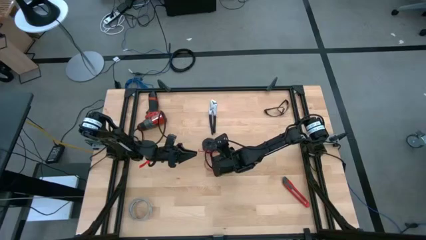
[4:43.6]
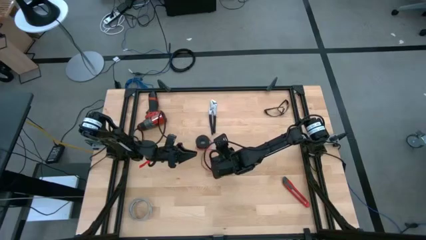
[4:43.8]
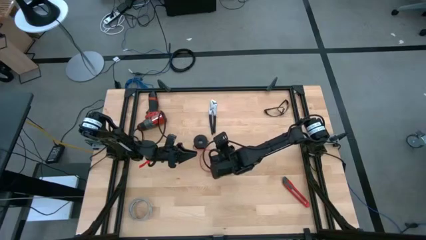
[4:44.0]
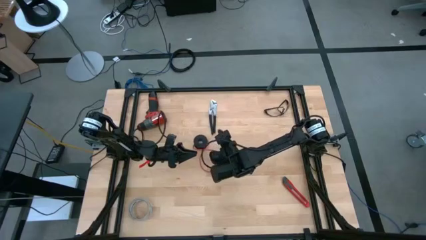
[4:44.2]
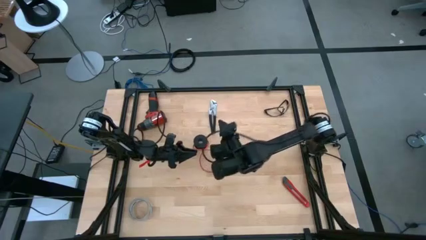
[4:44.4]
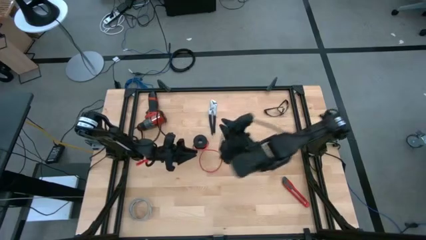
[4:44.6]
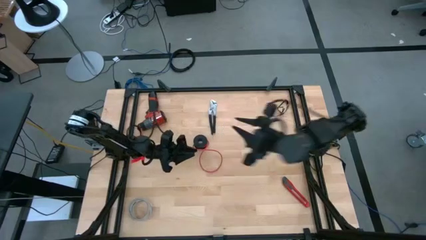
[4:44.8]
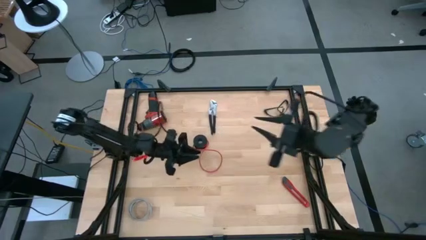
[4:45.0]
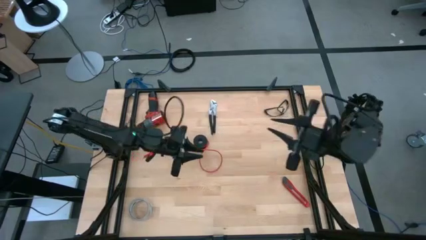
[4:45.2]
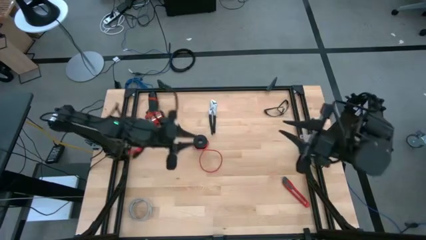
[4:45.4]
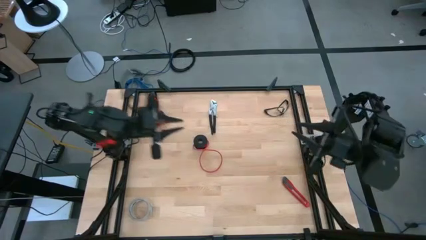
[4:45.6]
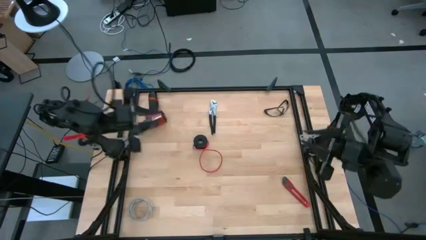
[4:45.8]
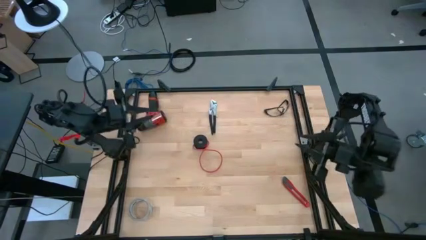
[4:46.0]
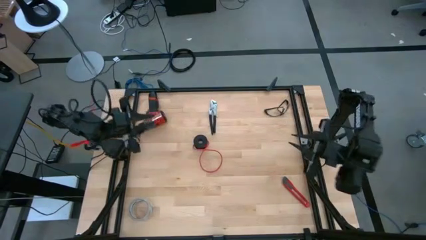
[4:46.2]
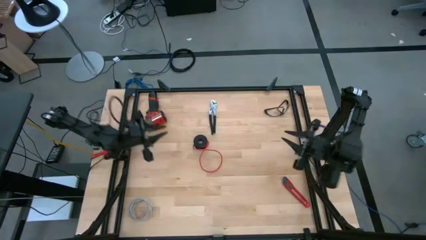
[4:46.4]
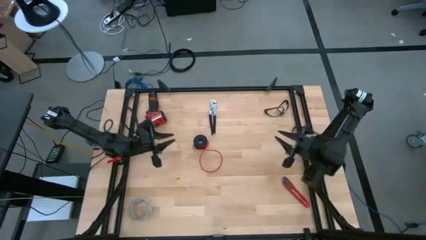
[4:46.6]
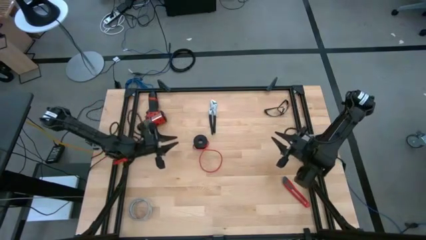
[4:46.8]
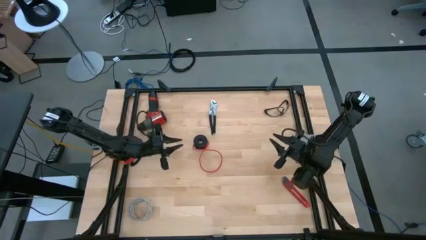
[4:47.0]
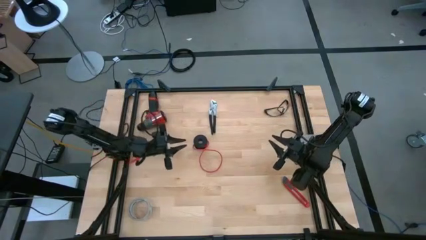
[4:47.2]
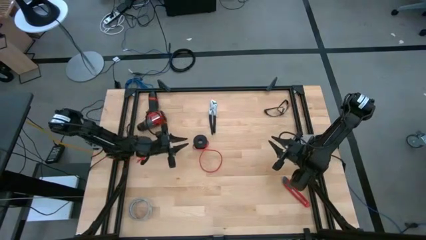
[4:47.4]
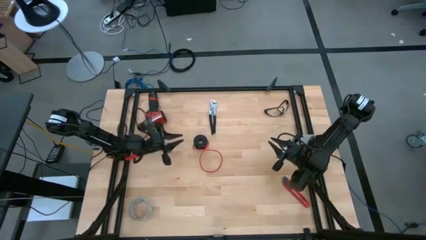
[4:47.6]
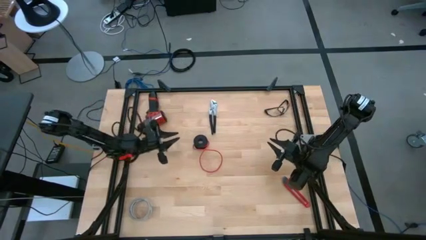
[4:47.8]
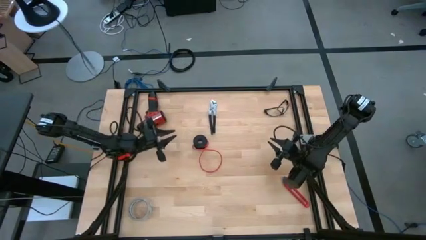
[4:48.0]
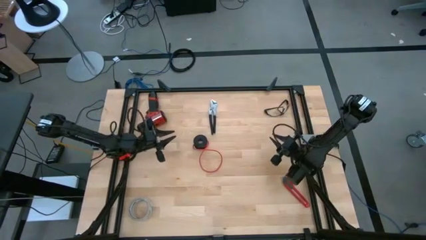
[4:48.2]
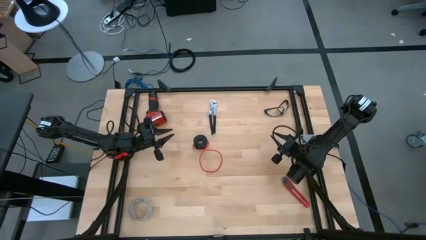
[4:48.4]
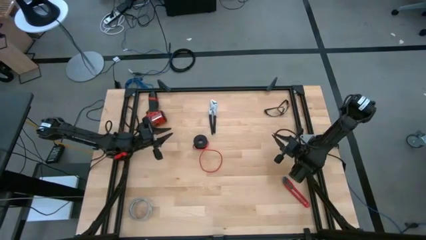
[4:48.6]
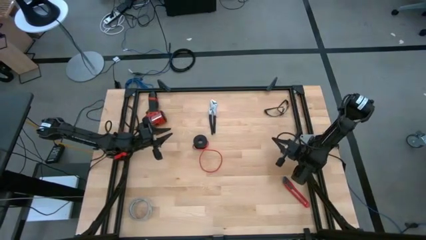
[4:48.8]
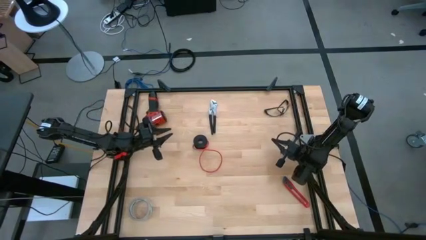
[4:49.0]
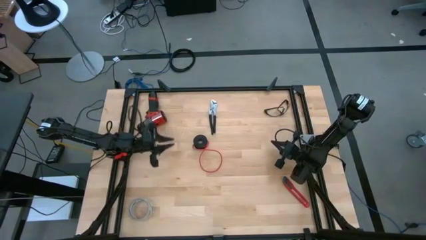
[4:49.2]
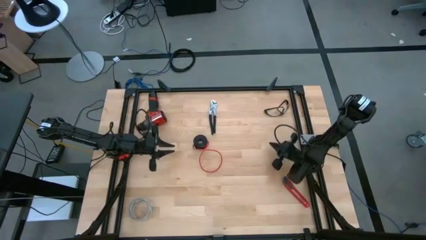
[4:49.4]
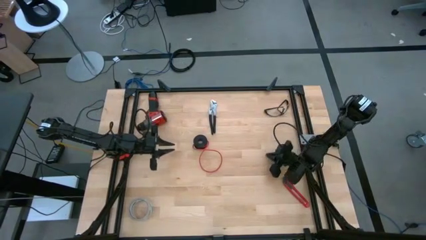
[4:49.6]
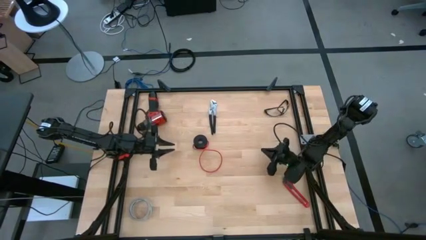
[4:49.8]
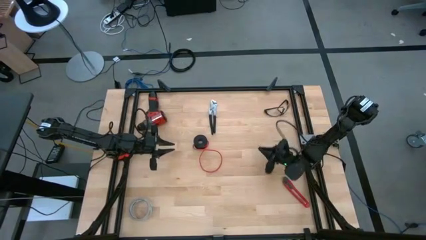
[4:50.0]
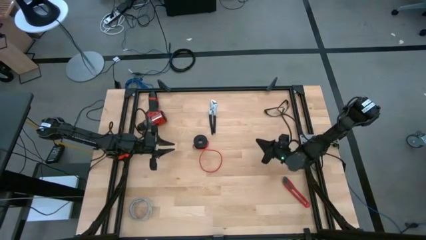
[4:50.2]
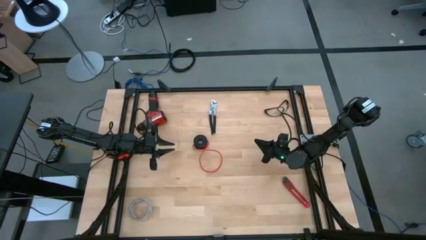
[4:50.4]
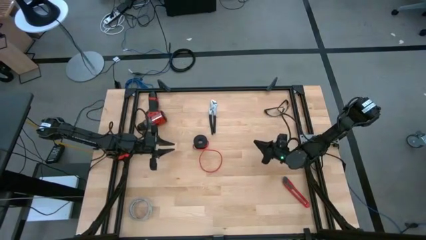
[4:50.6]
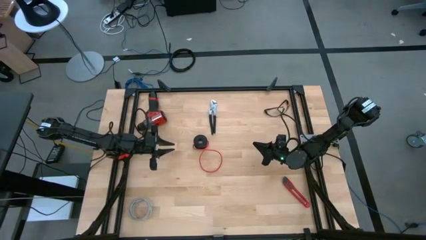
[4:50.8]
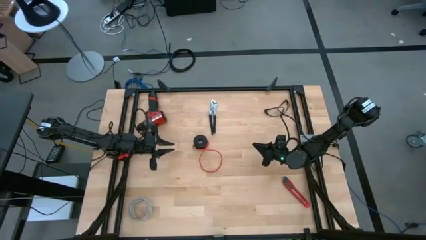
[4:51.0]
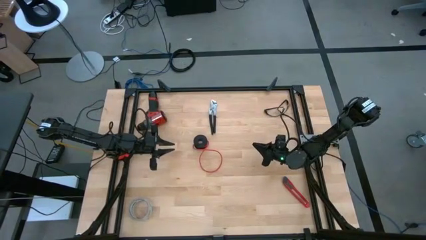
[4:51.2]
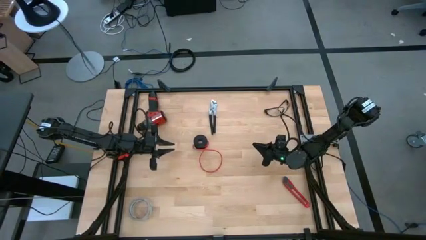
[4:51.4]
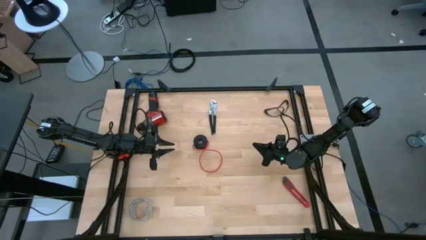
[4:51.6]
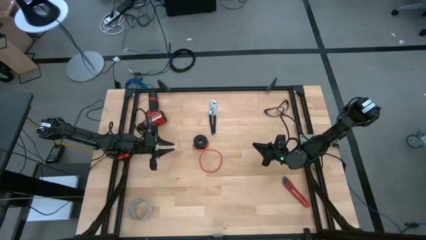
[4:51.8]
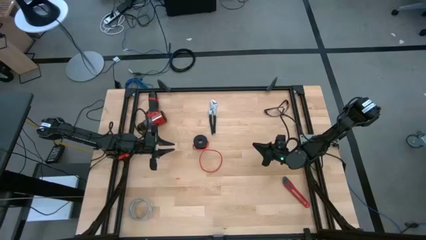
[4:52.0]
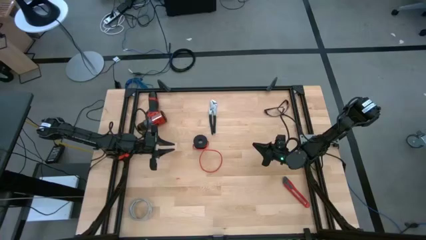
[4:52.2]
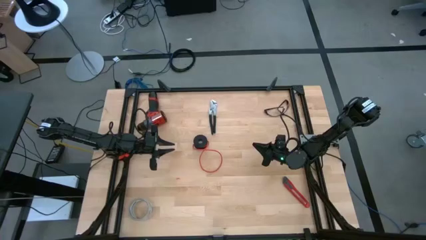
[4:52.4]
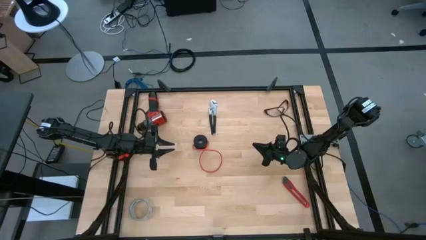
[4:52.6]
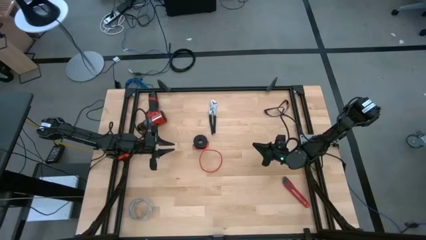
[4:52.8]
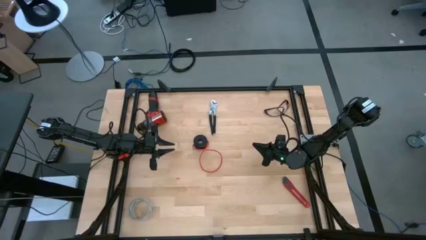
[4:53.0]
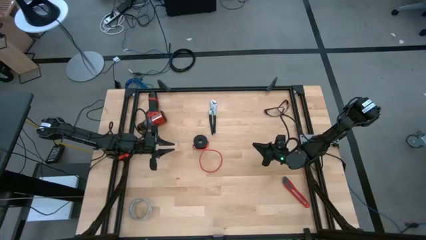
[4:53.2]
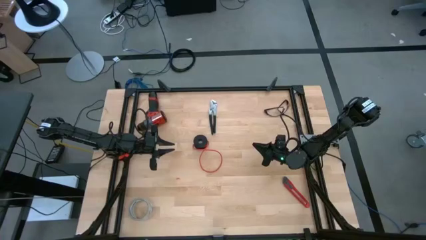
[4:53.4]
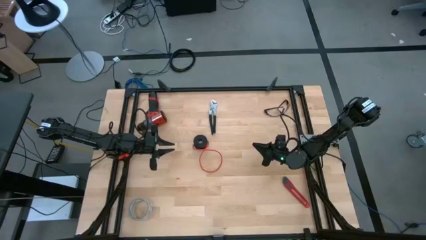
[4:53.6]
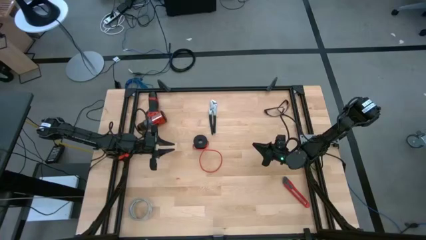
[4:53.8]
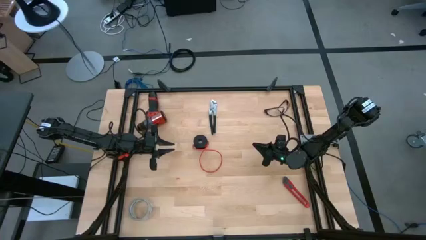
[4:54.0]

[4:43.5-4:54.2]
Task: Coil cords
Return to Home Position

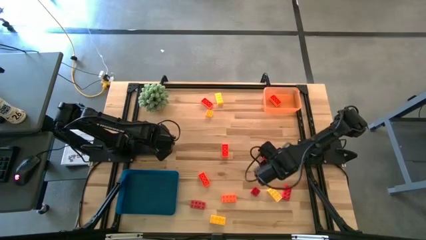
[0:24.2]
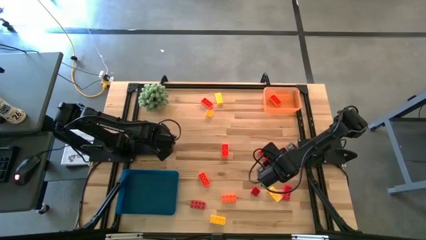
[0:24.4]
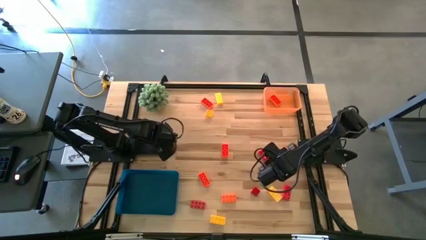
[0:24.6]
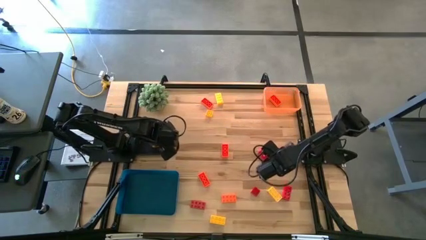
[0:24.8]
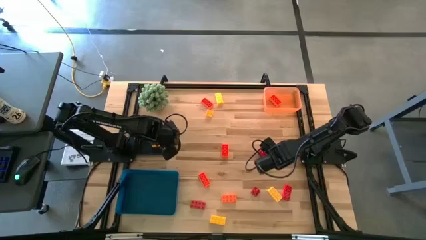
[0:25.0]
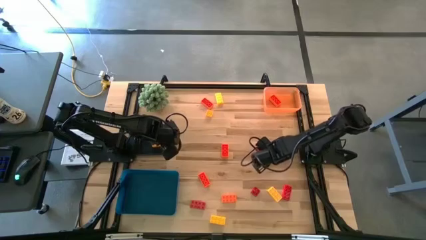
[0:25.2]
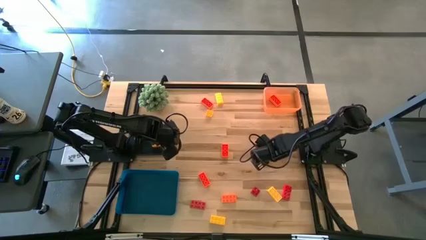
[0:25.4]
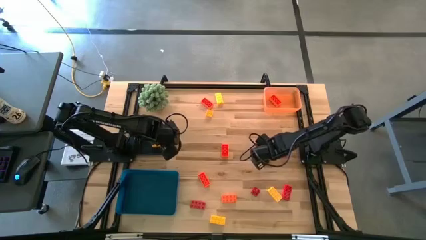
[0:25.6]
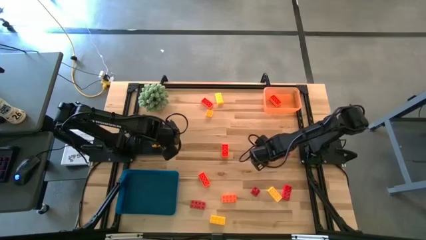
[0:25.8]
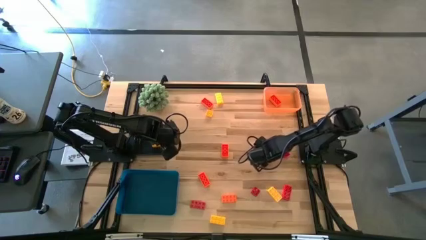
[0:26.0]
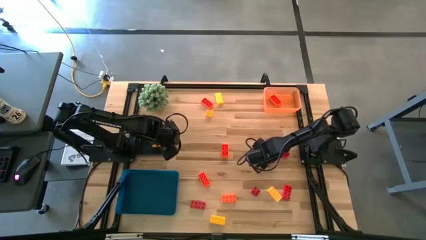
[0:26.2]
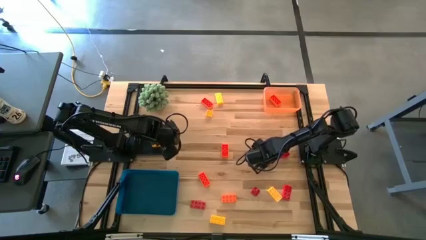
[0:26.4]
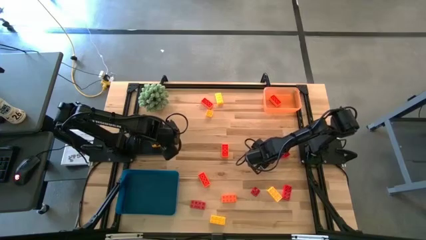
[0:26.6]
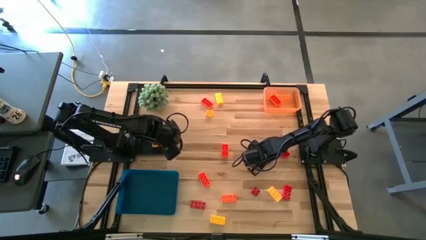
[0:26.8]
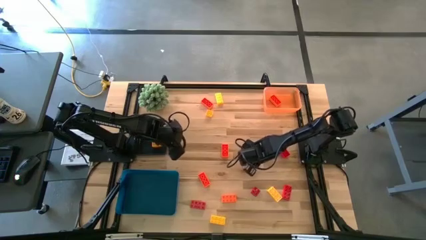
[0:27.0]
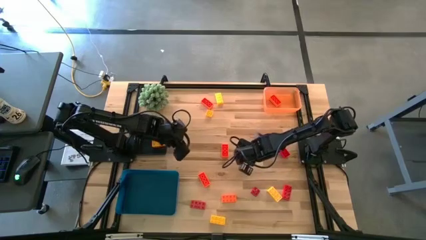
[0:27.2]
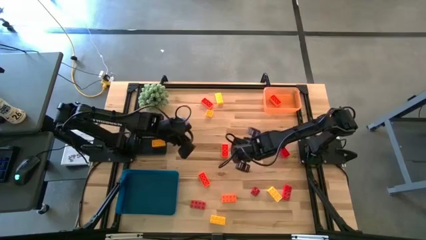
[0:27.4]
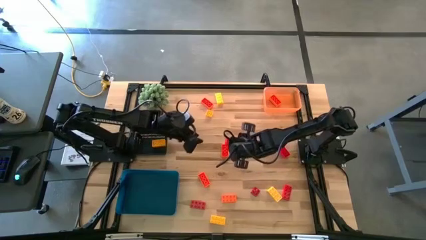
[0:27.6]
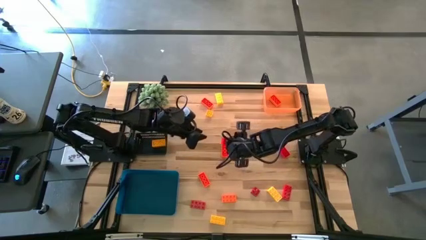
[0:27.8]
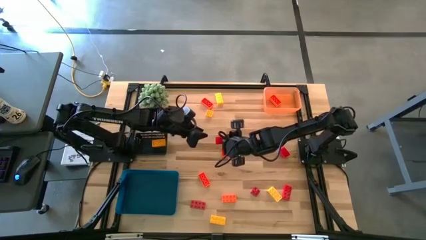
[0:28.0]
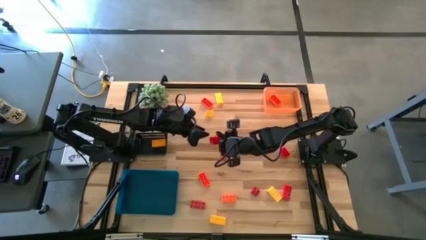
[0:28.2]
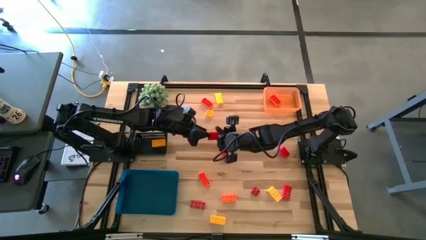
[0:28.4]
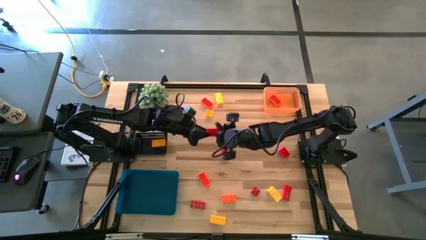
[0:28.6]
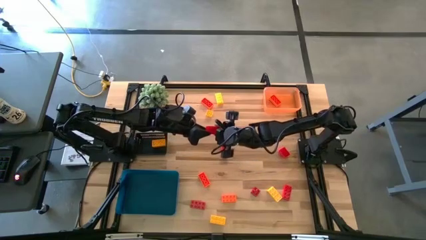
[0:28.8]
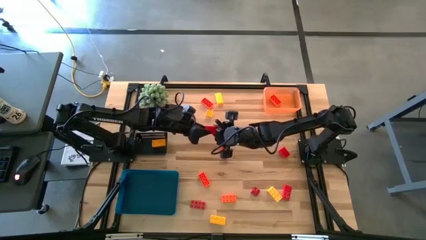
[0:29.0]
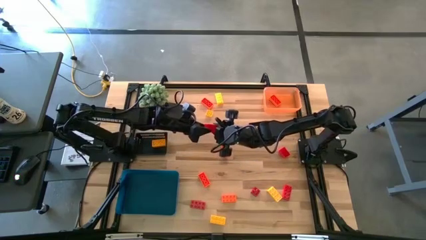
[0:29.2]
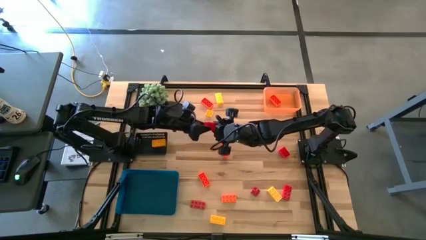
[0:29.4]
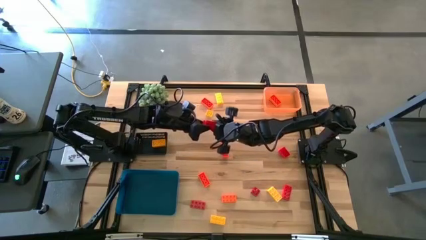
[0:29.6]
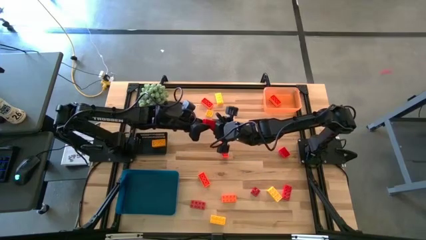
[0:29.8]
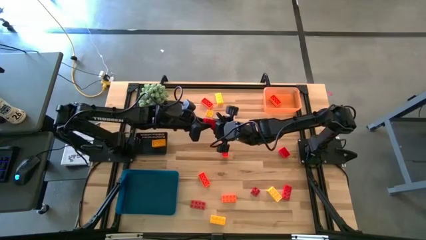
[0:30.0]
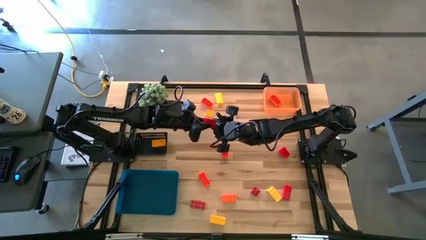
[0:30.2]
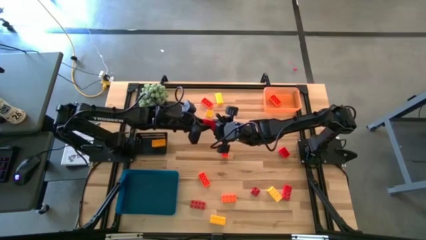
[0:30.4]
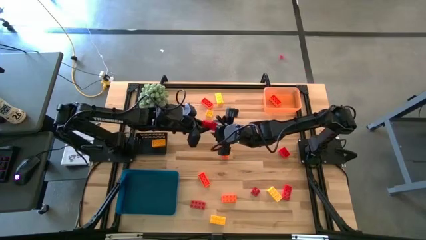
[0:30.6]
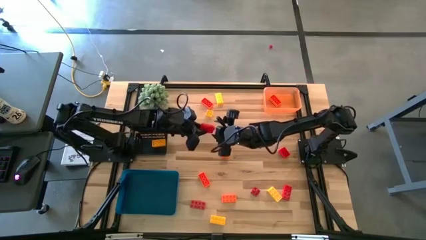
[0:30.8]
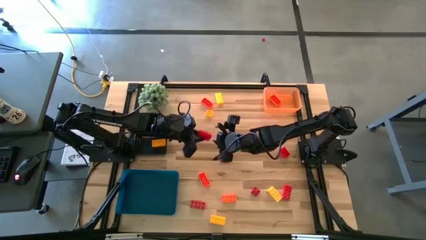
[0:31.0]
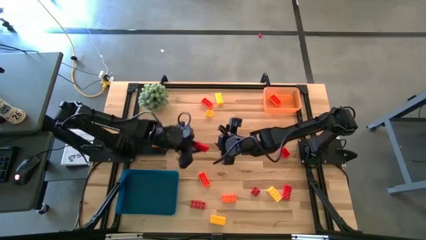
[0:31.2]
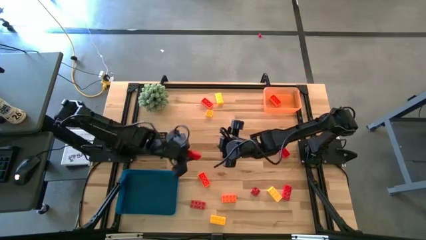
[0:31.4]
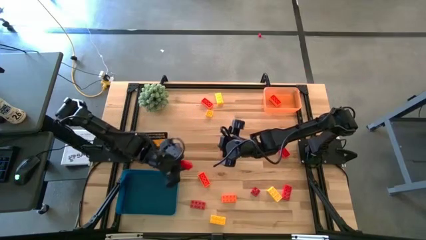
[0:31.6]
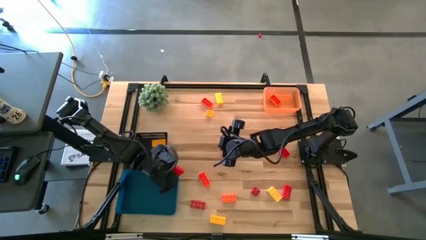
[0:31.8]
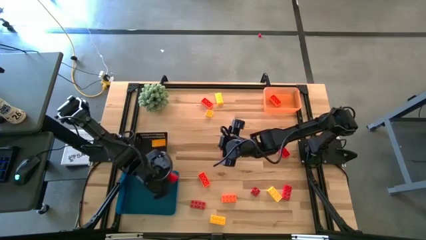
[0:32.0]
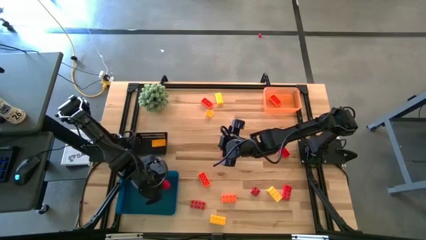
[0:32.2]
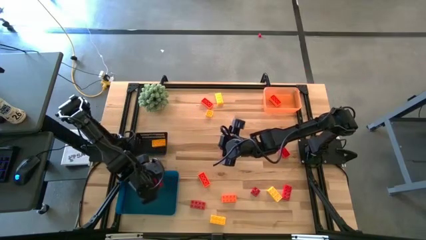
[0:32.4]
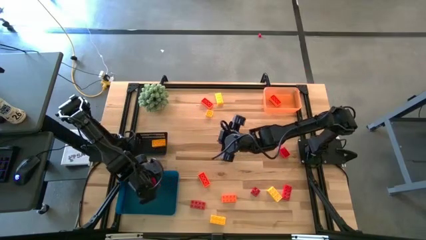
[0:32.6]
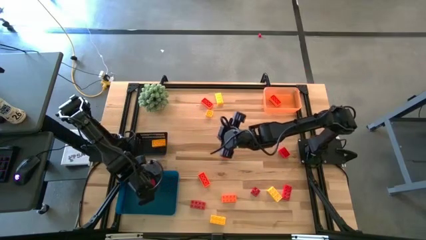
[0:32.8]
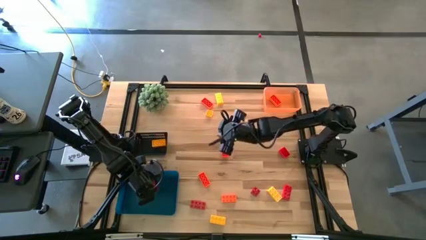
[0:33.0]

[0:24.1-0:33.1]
Task: Sort & place blocks by color
Put the red game piece into the blue bin
